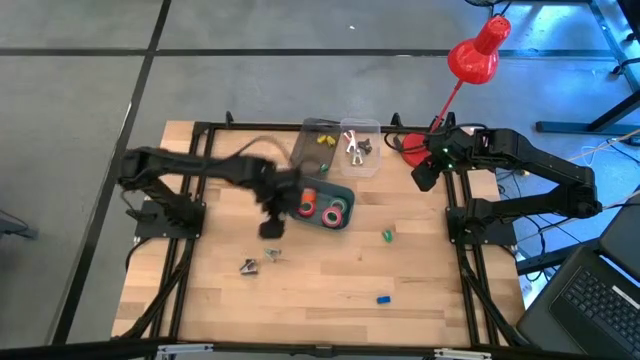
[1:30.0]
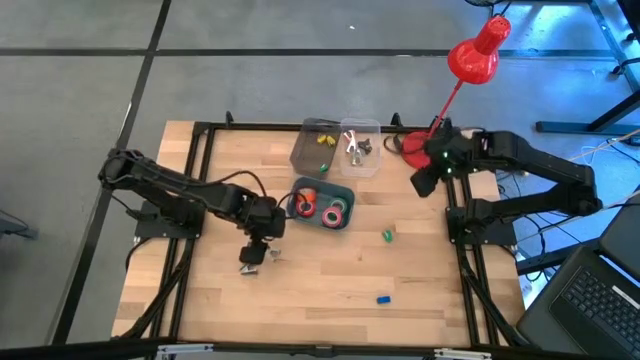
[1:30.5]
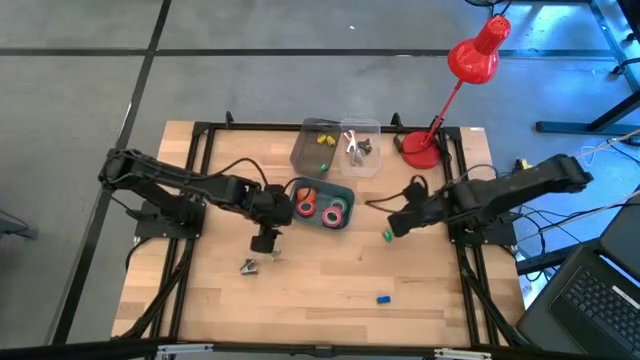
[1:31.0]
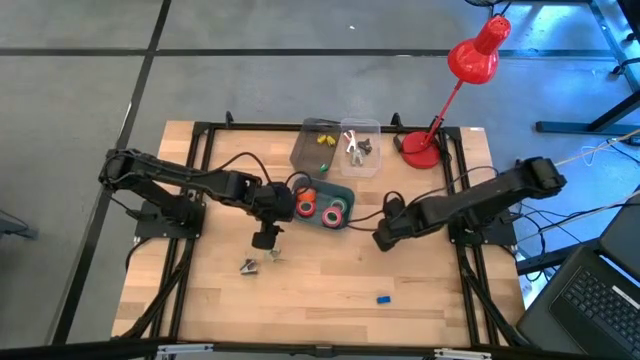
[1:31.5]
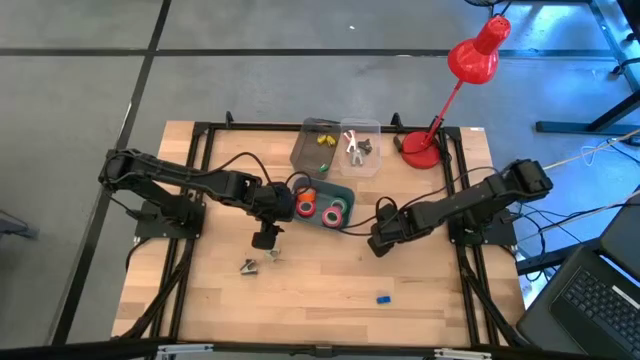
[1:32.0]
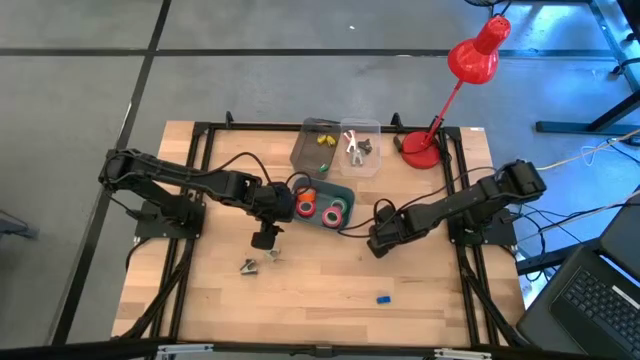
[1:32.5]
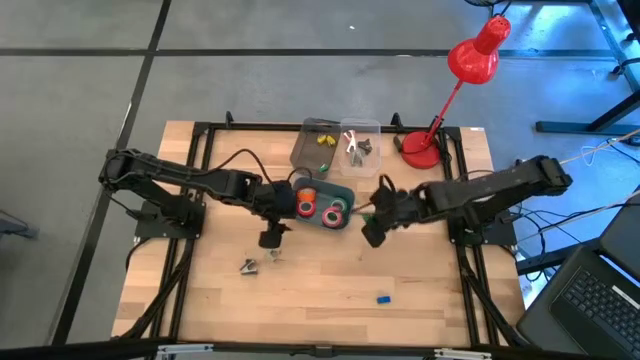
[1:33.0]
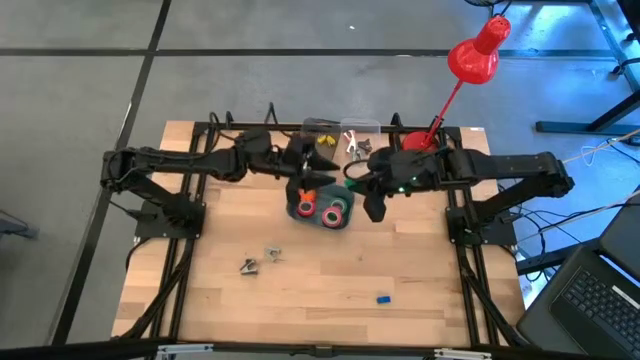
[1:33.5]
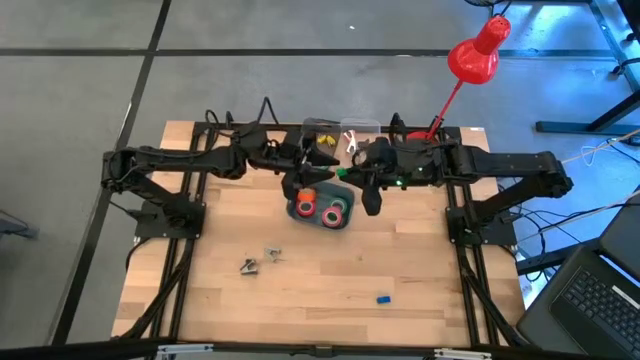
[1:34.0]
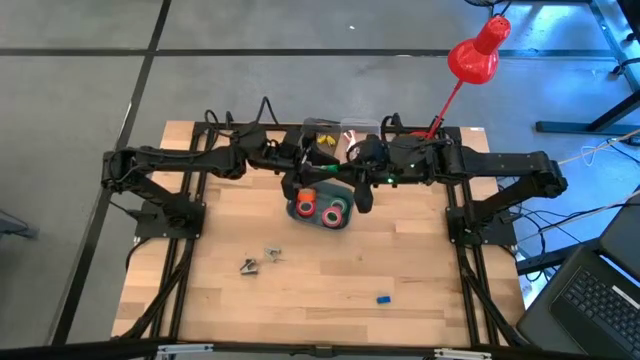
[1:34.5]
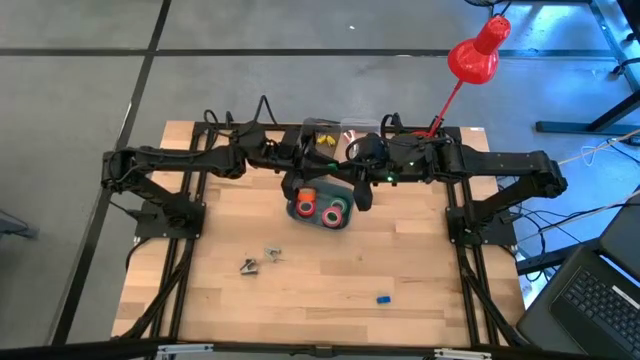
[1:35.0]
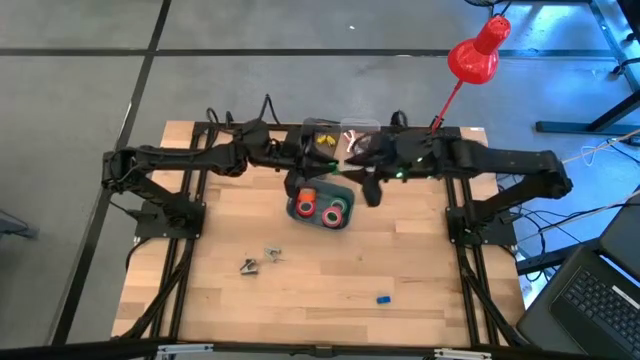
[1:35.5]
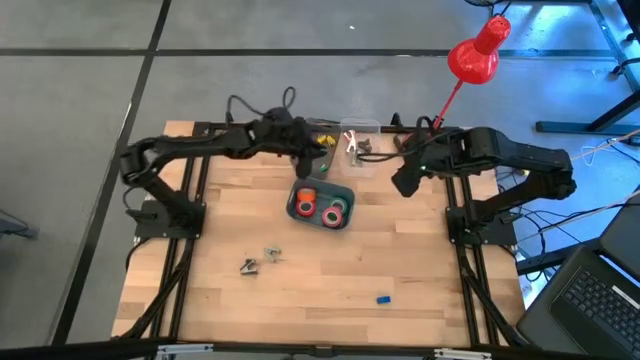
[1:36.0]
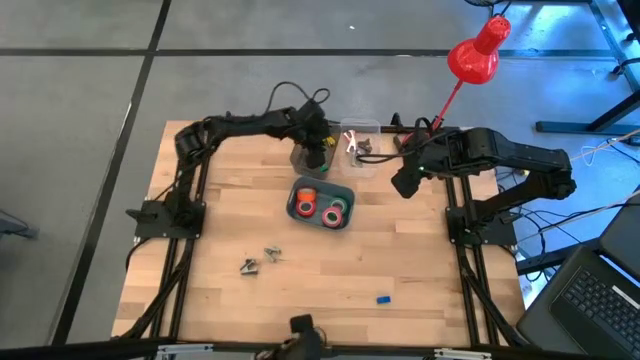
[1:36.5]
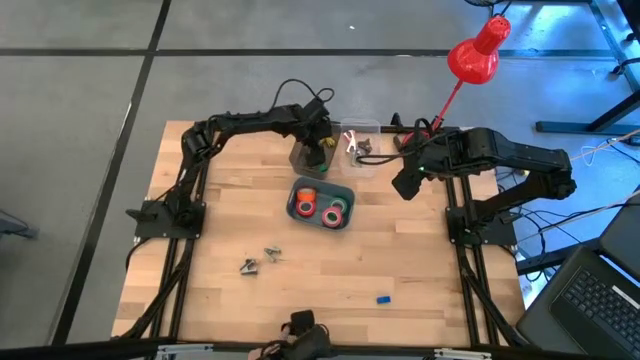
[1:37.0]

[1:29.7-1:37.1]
Task: Pick and place Stapler, Stapler remover, tape
Put the green stapler into the black bin

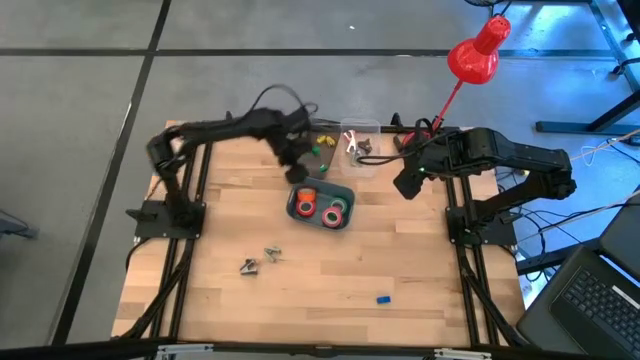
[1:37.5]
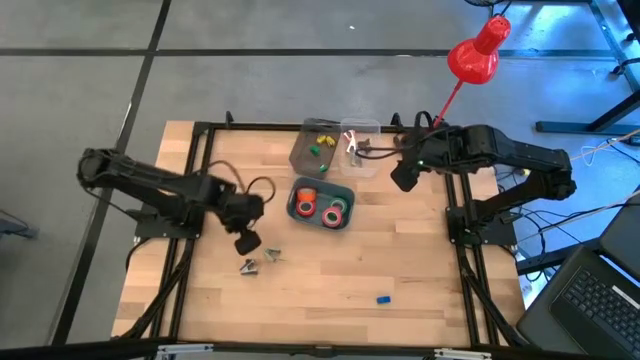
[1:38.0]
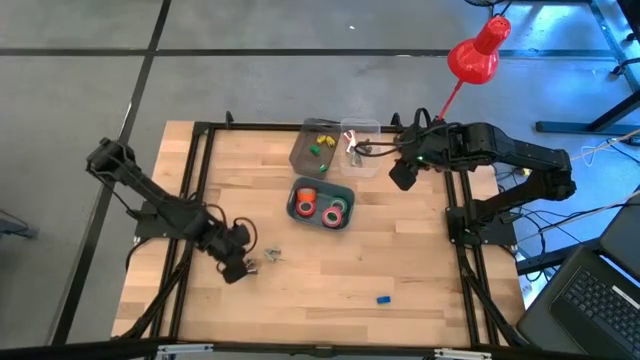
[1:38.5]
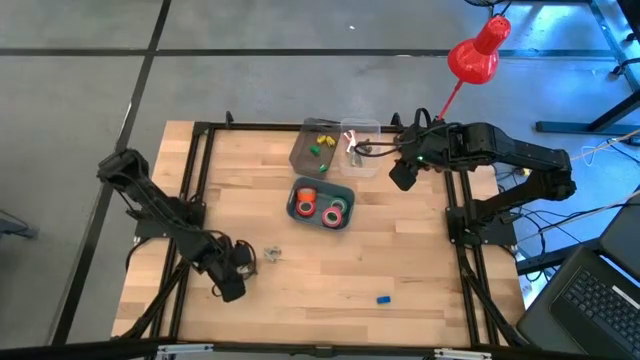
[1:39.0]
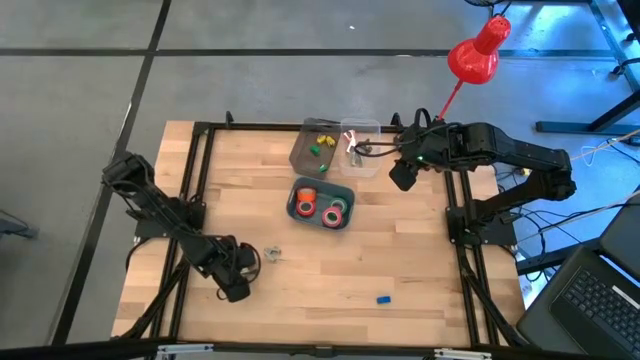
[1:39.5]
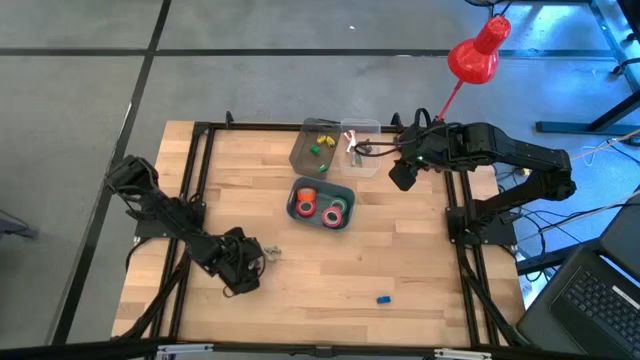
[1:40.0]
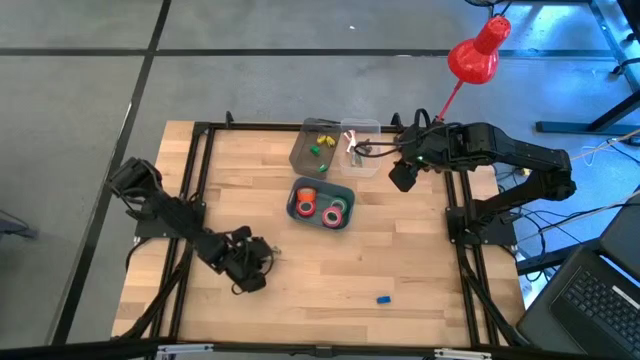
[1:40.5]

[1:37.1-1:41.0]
Put the black staple remover into the white bin

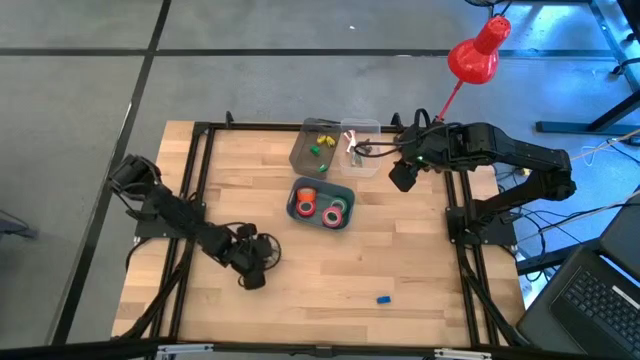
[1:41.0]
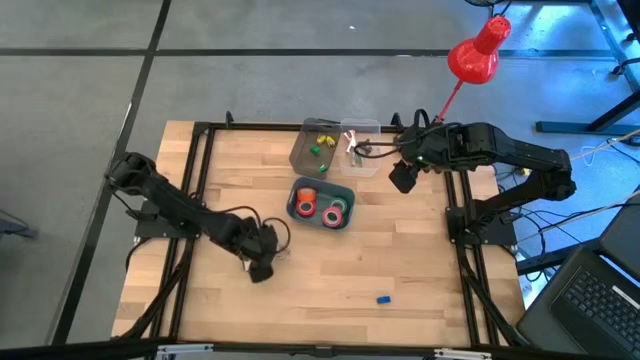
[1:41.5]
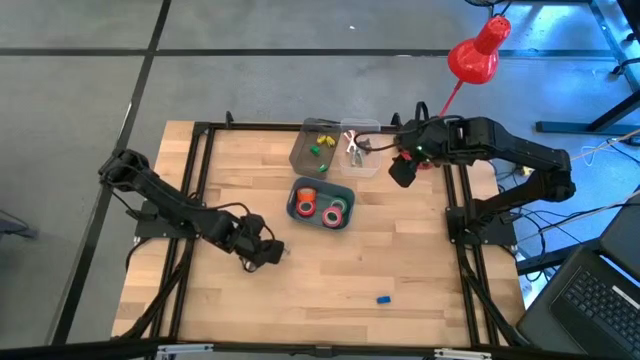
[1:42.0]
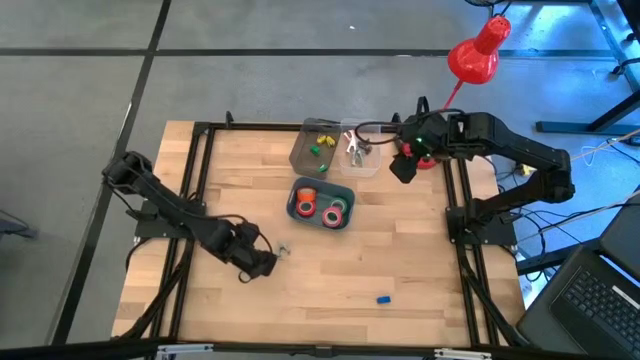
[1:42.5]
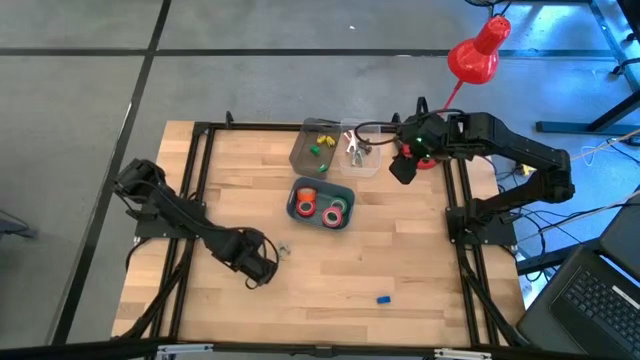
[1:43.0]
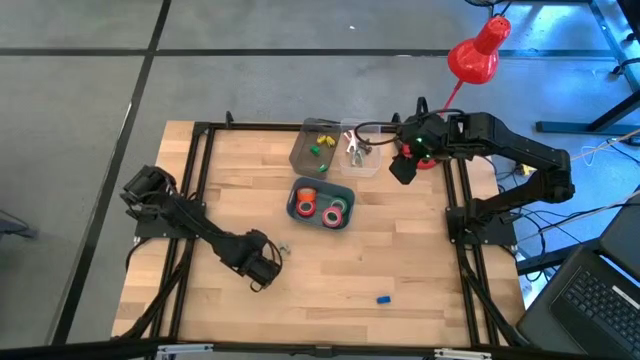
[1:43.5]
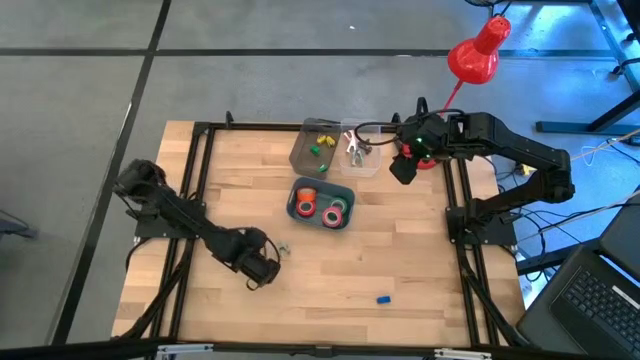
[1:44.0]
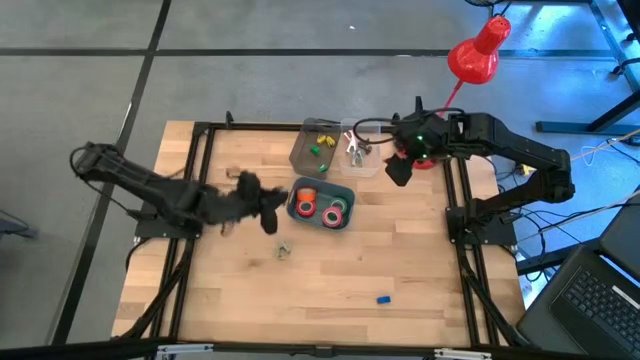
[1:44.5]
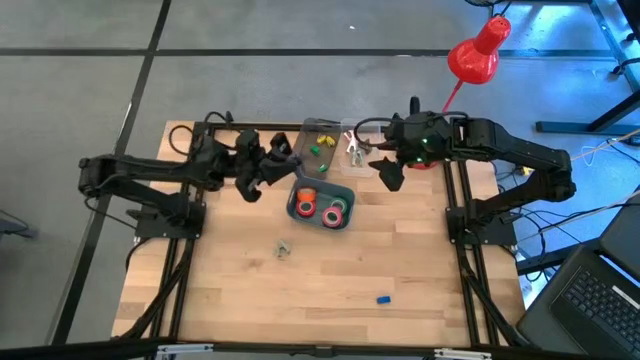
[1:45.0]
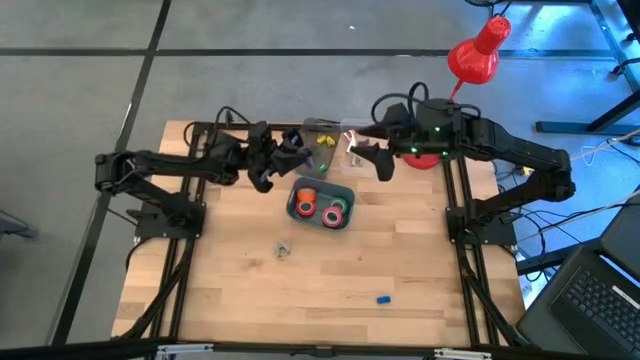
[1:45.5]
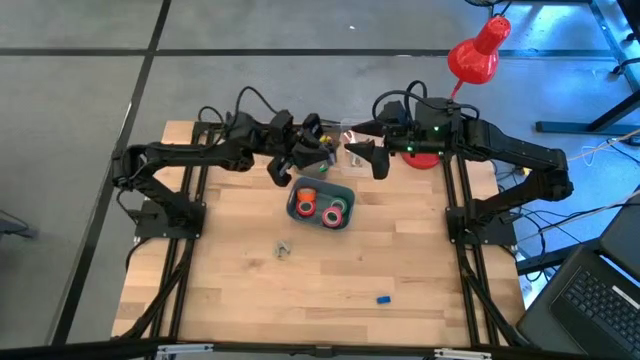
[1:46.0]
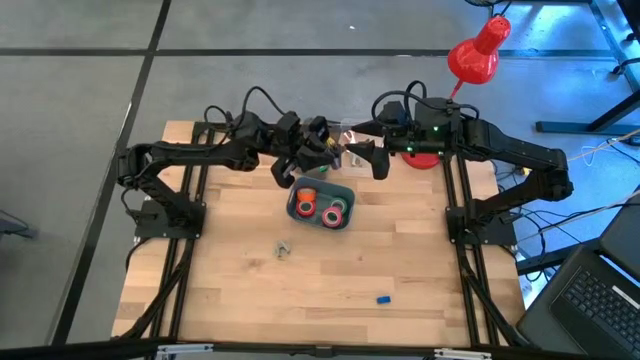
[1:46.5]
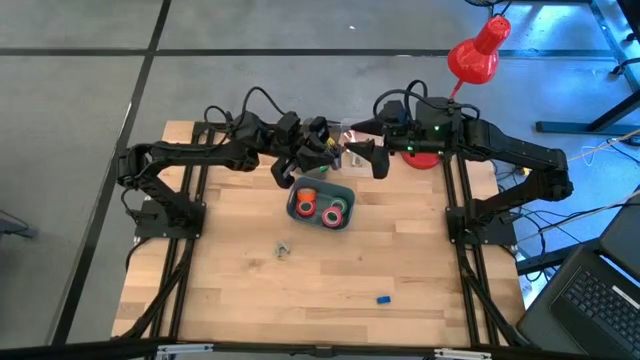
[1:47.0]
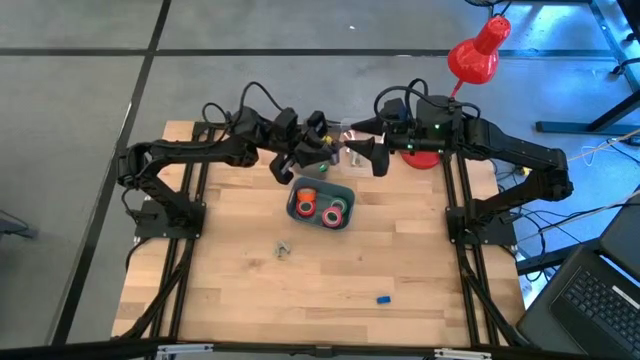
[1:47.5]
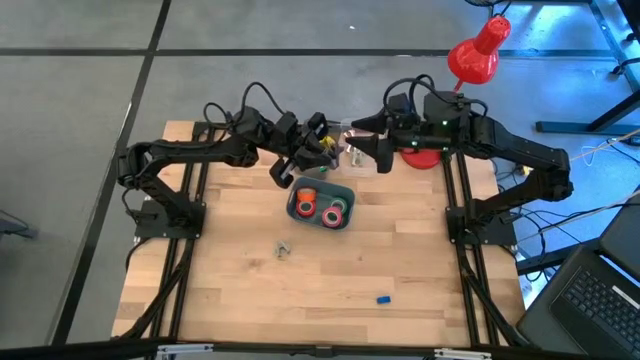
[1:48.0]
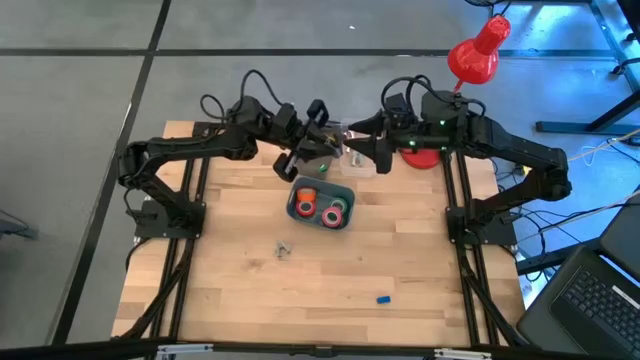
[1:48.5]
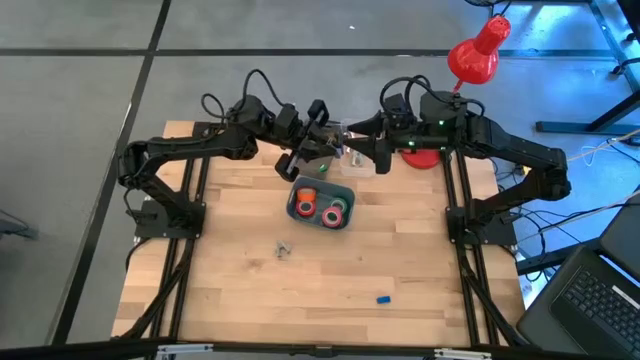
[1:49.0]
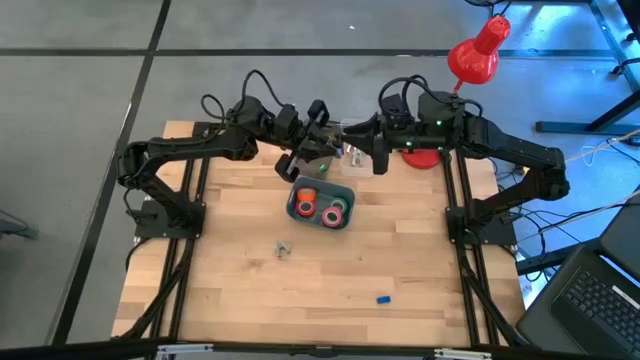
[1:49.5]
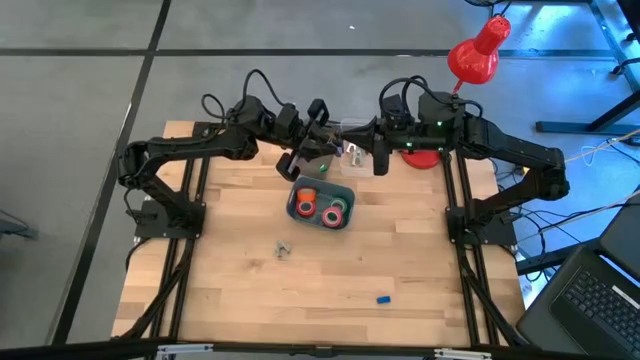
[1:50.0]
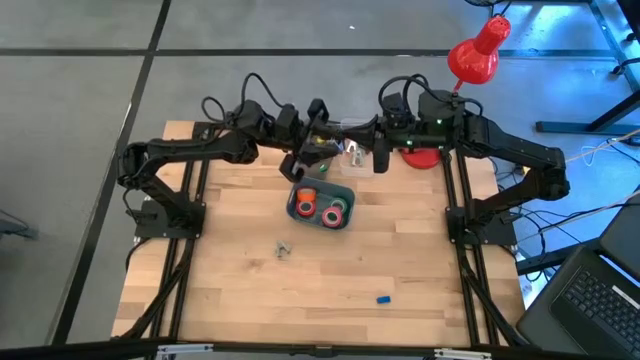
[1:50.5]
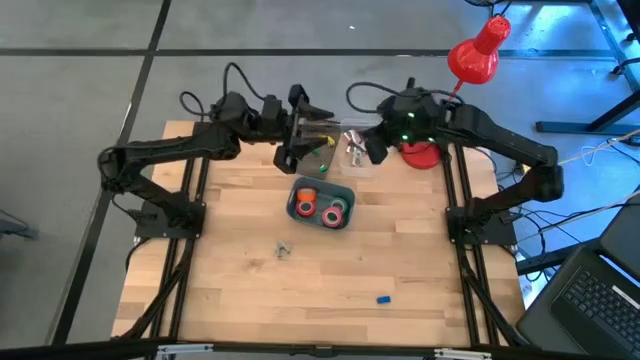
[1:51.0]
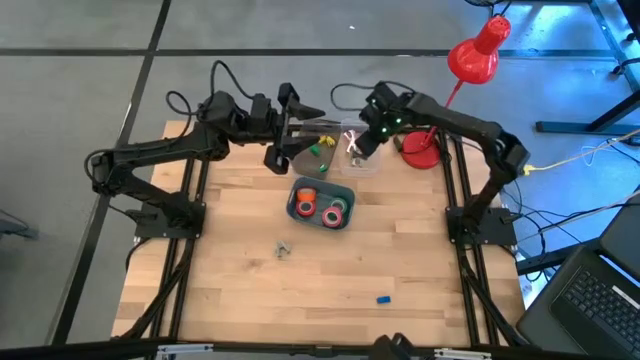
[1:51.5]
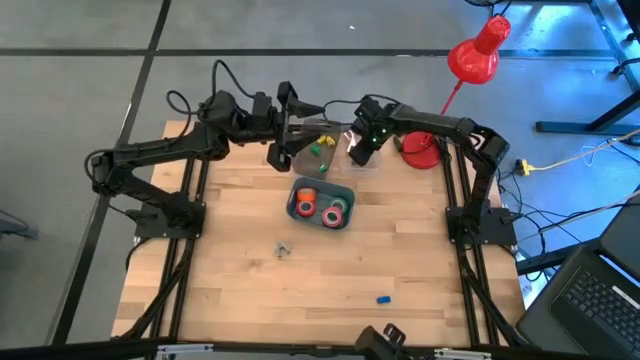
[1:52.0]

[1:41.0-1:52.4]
Put the black staple remover into the white bin
